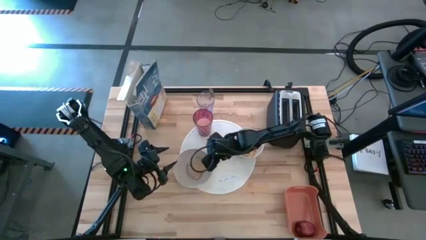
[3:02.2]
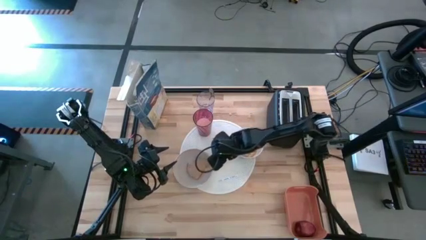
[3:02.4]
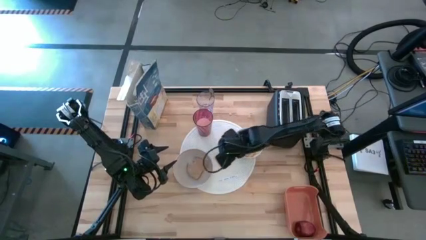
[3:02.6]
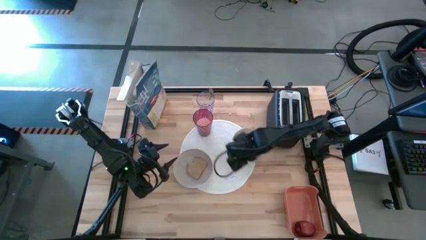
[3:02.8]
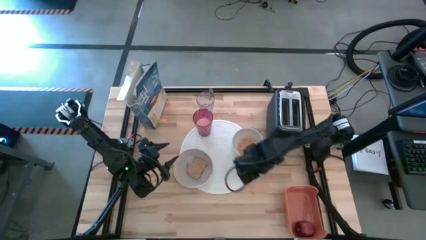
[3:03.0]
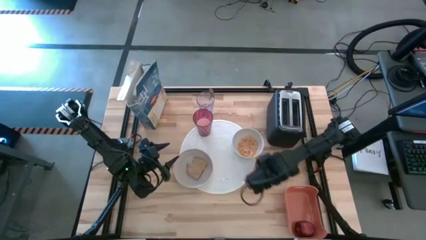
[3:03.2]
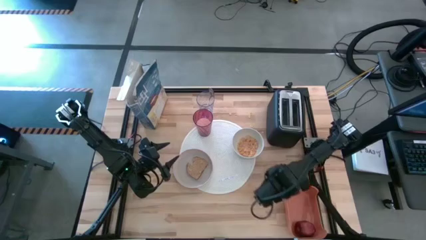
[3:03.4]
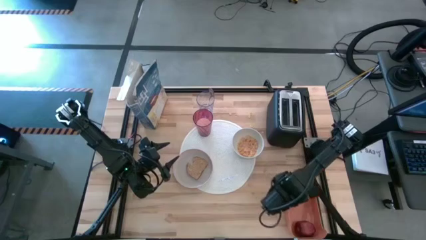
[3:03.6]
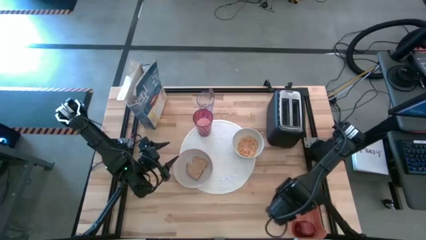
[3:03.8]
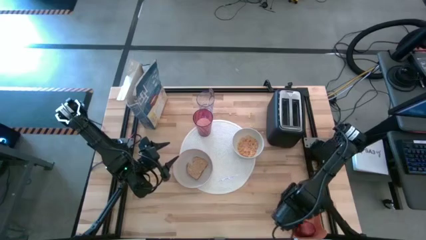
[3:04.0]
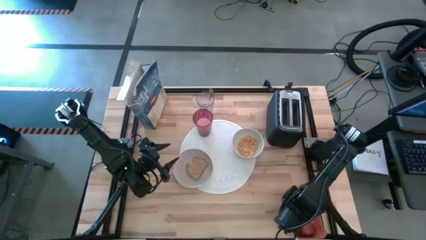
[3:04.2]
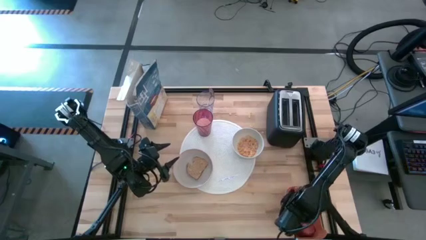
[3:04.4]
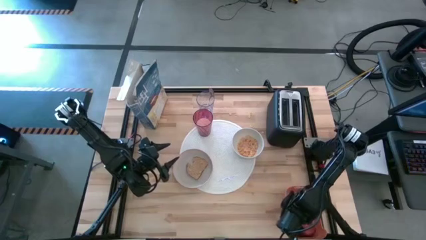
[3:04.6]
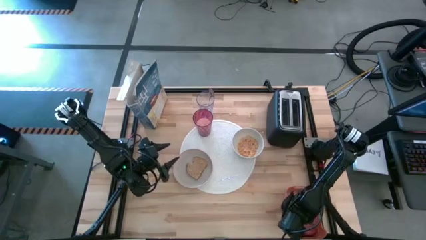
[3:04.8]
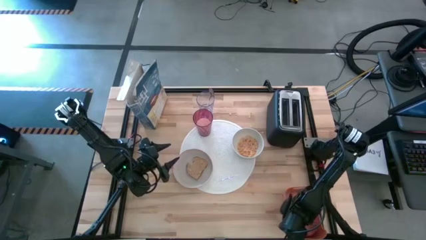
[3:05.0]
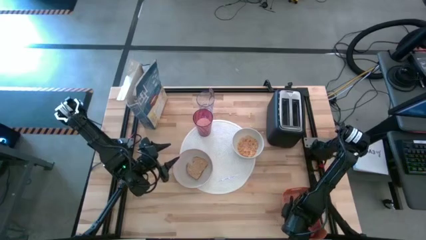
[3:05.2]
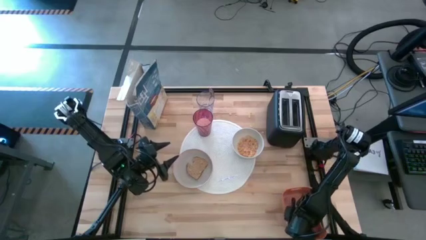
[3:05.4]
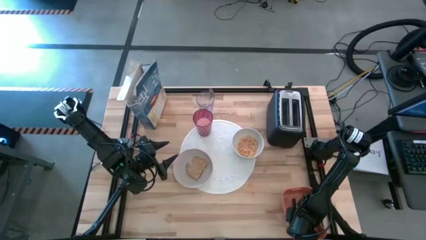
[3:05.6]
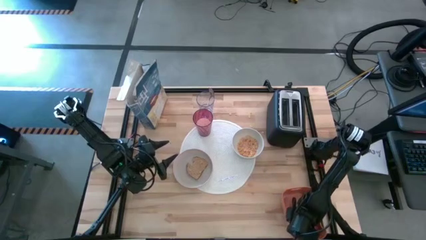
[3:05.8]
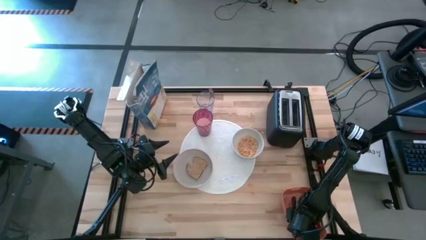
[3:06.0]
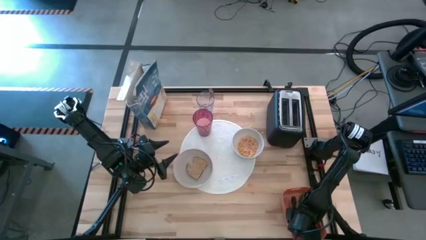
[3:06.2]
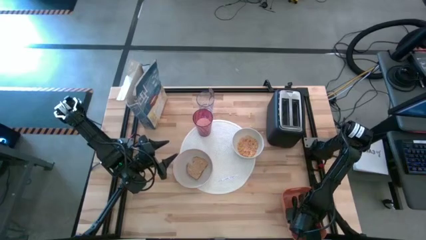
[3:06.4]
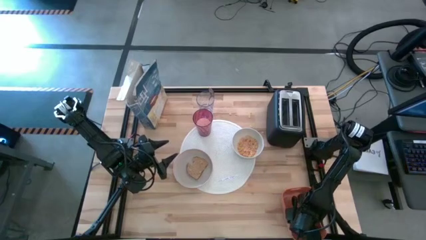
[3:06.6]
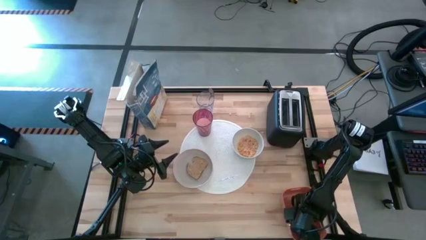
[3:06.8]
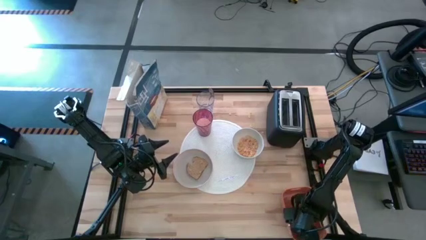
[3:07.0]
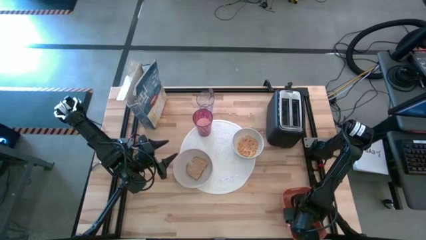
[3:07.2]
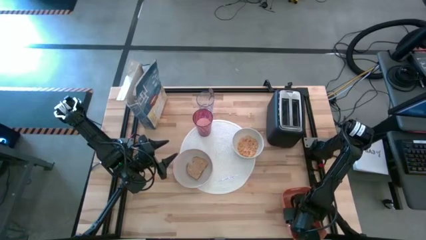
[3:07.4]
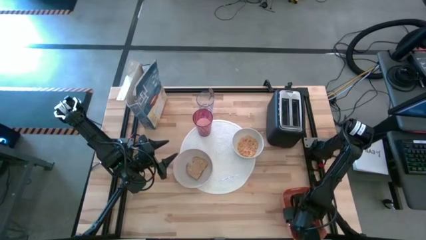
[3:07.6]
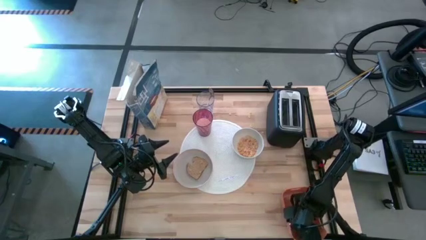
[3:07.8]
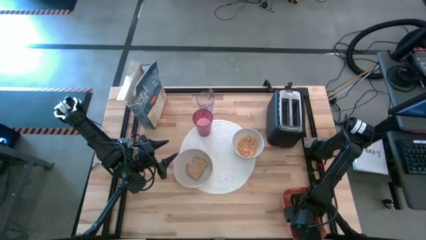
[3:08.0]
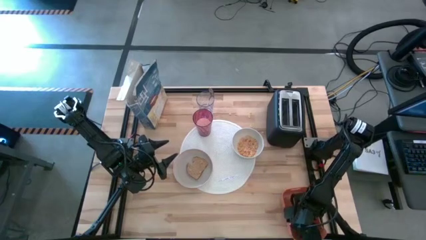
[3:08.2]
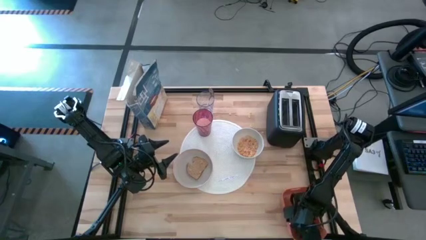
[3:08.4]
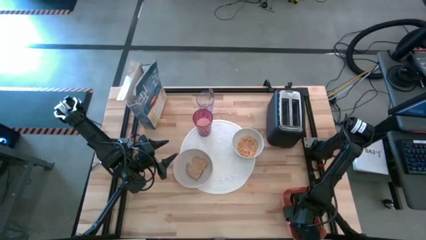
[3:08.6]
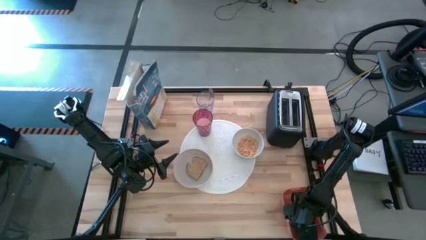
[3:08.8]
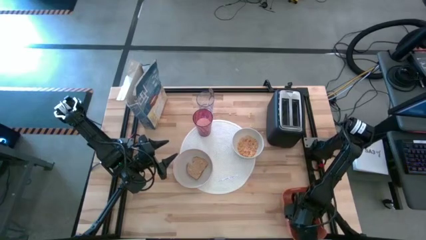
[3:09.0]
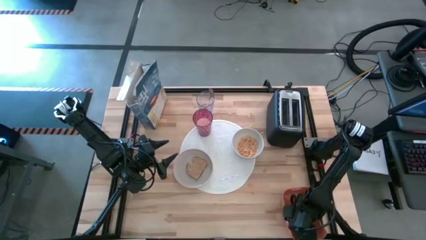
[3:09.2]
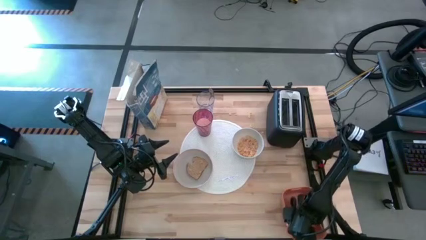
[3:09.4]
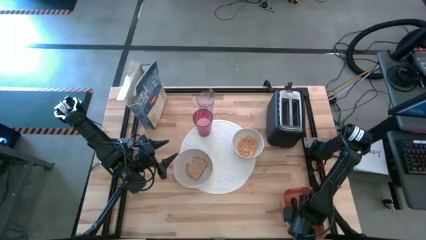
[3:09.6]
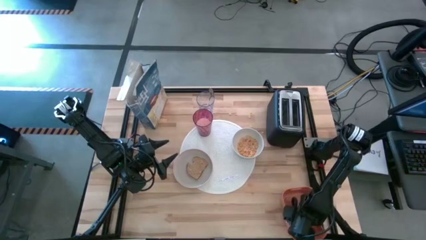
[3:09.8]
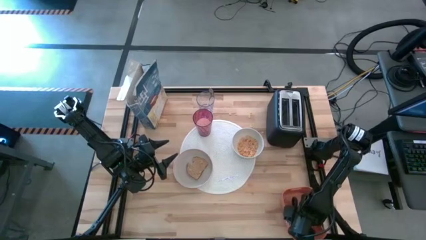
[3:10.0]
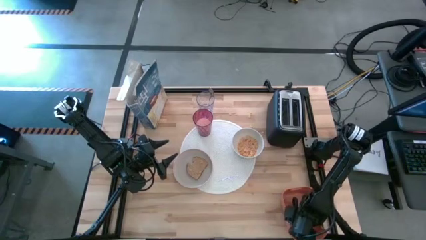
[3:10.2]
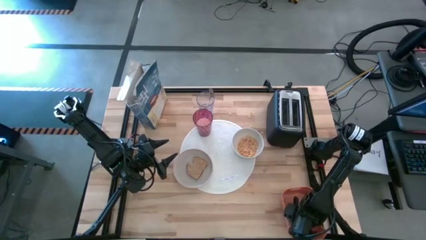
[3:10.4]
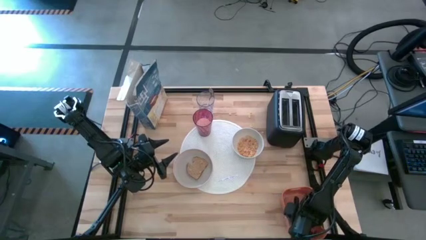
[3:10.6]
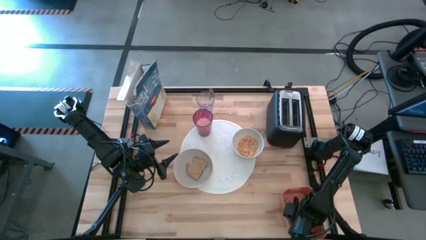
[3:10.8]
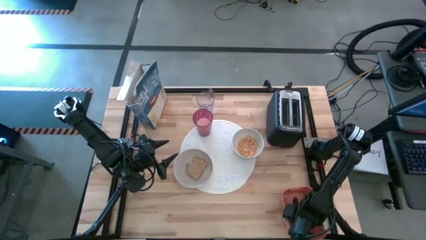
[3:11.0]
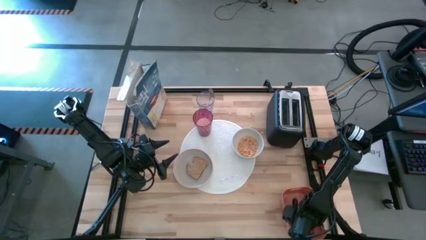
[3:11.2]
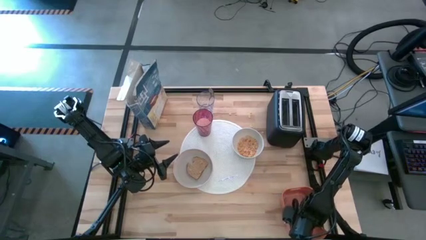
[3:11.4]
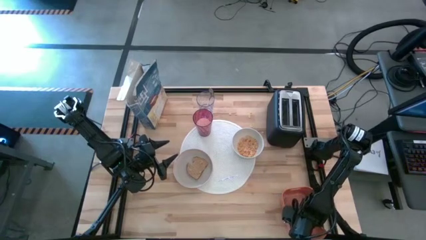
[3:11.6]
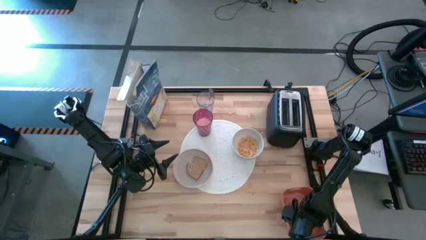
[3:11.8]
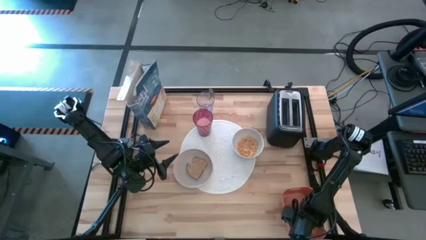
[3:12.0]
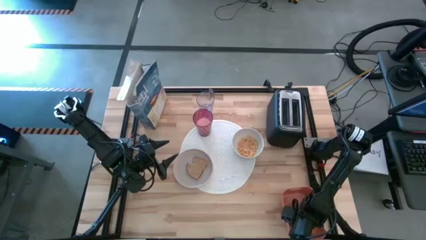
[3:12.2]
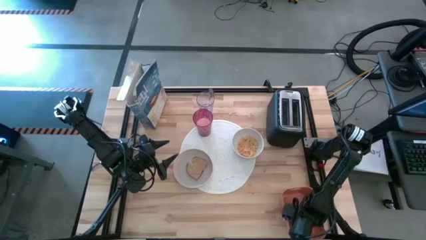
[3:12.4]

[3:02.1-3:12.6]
Task: Arrange a breakfast setting
Put the apple on the white table mat to the bottom of the brown plate

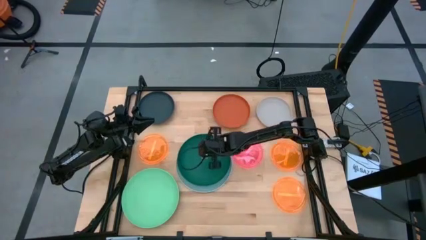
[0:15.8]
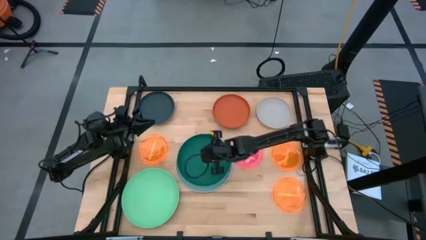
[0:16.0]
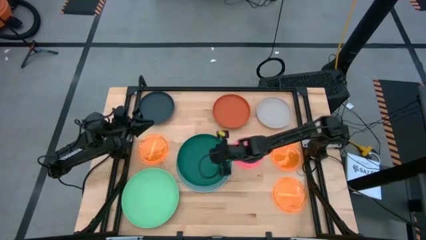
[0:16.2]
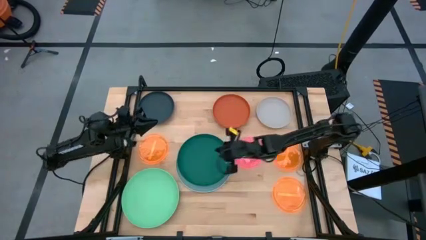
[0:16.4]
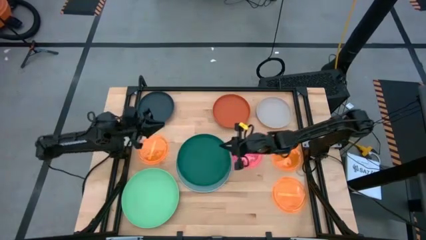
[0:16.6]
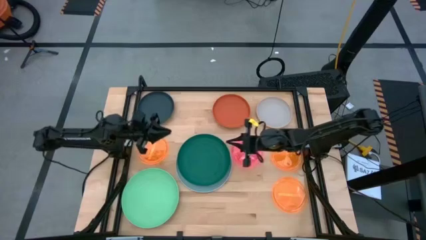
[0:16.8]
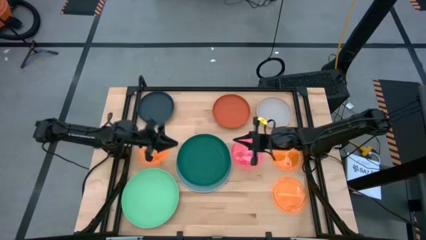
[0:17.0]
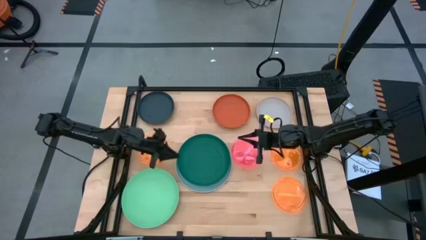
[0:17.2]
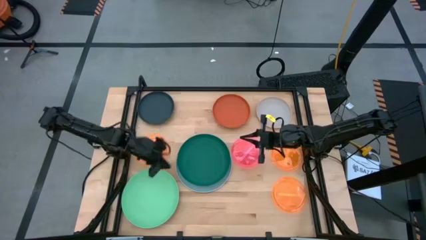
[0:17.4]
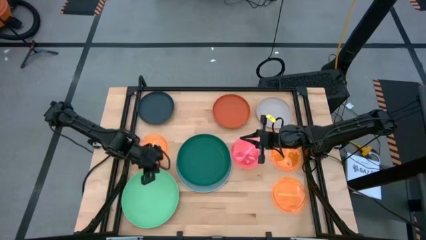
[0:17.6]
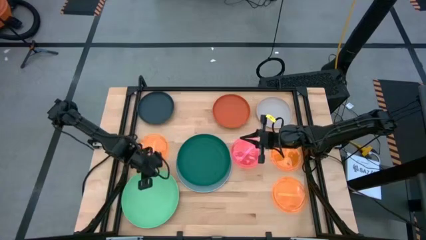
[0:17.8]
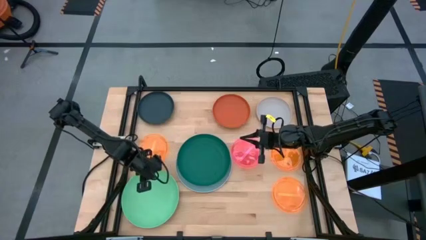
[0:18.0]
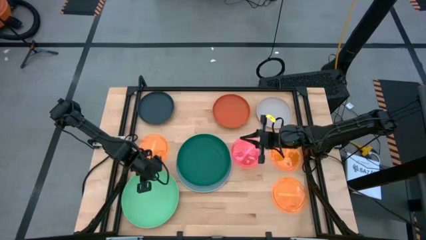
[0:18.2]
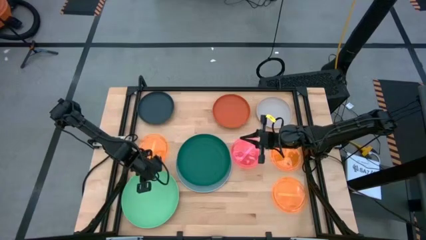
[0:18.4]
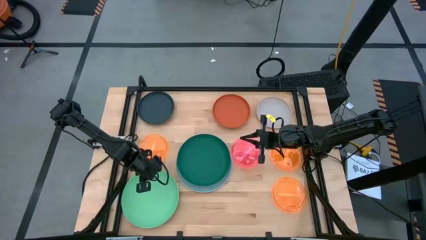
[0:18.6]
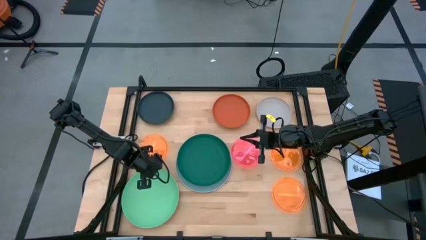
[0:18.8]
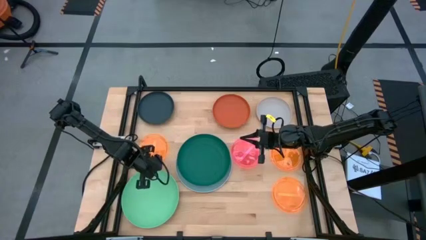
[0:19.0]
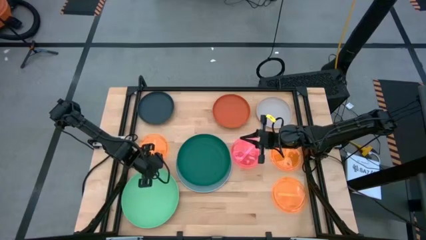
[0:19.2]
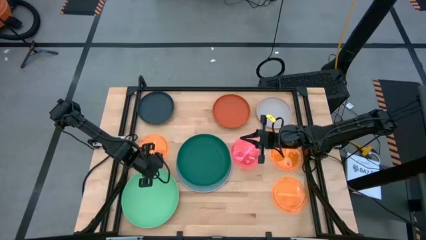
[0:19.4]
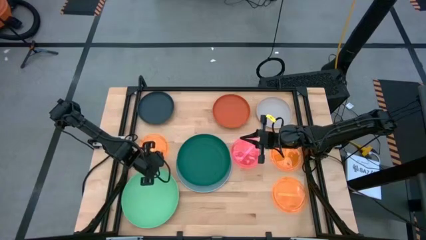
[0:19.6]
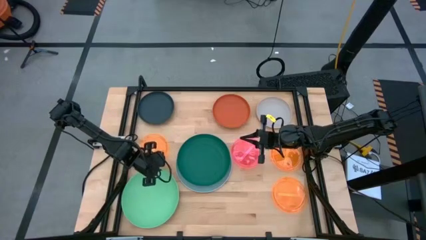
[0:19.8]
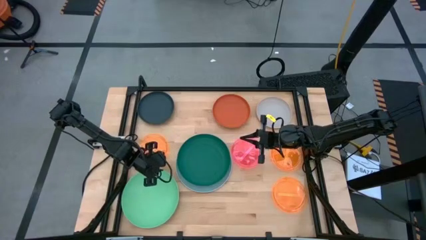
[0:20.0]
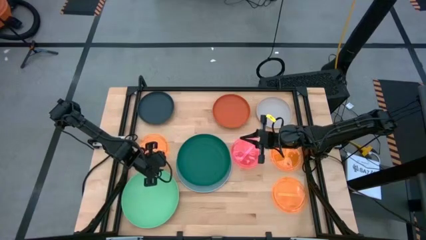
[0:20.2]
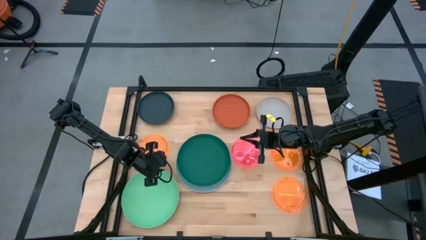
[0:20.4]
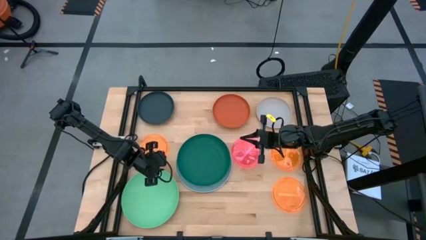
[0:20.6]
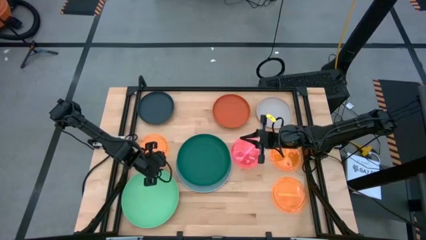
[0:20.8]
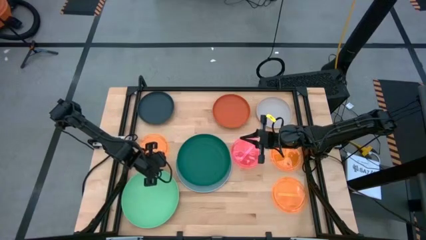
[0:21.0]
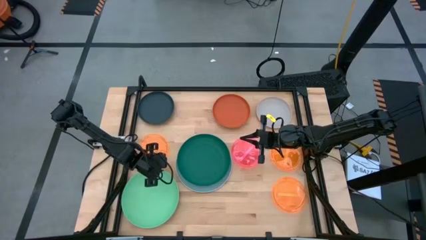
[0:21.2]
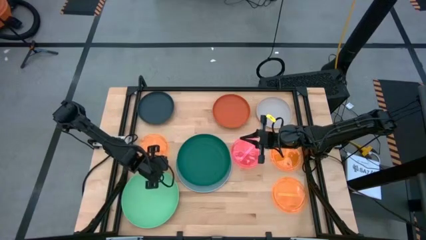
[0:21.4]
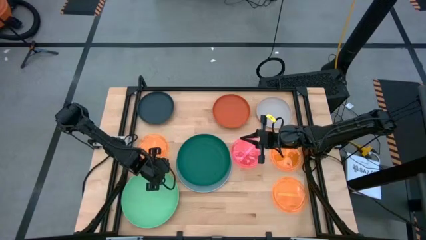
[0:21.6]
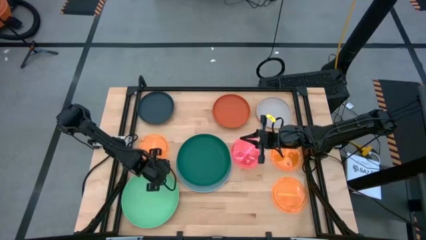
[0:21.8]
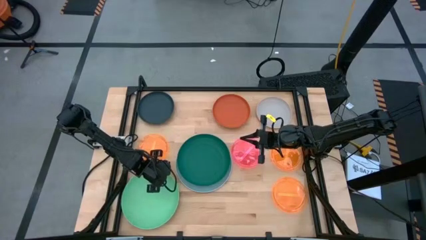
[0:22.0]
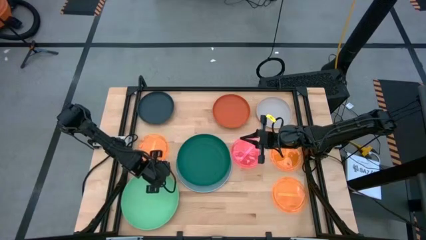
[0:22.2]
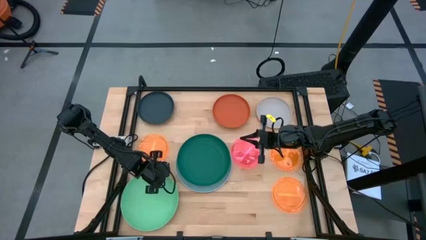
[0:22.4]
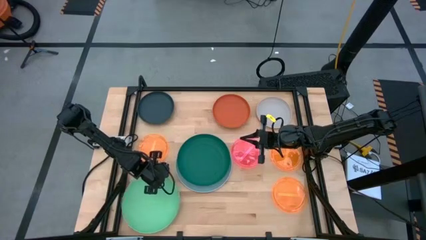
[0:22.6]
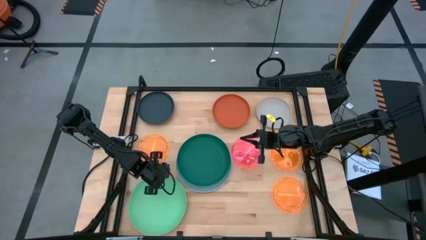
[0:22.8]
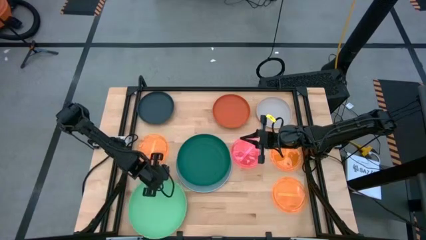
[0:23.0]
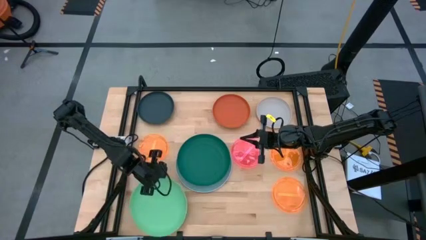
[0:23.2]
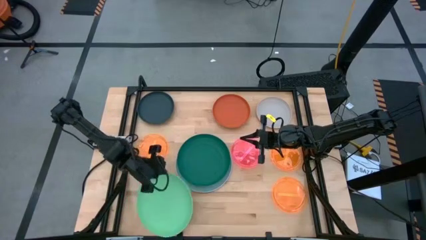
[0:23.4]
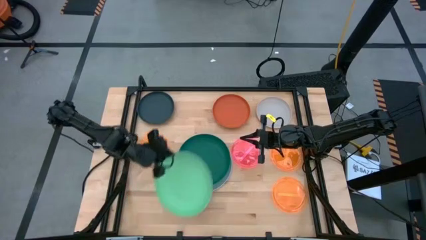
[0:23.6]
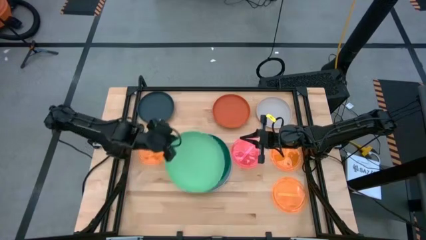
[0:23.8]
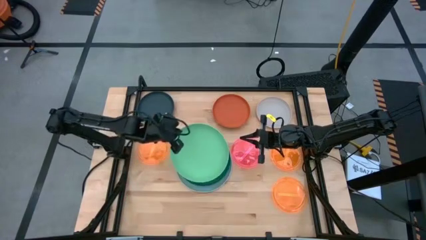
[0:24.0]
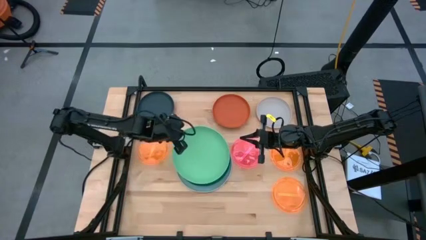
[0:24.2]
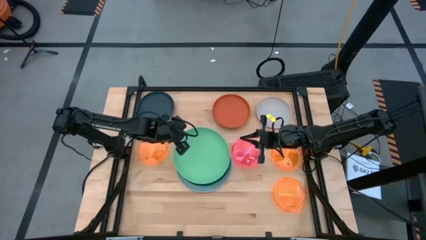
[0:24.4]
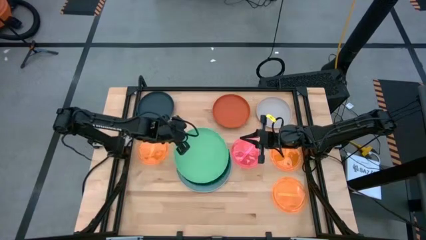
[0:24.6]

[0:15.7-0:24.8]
Task: Stack plastic plates
Stack the light green plate on top of the green plate
